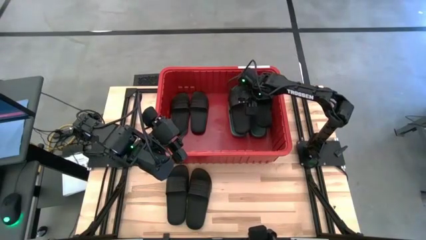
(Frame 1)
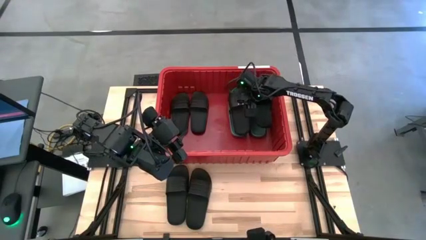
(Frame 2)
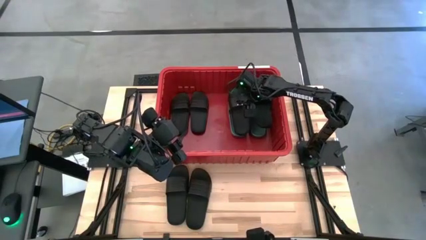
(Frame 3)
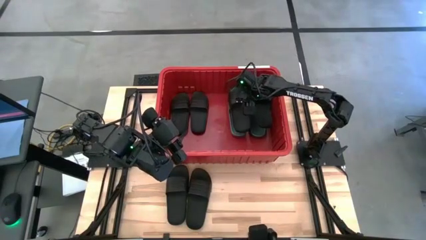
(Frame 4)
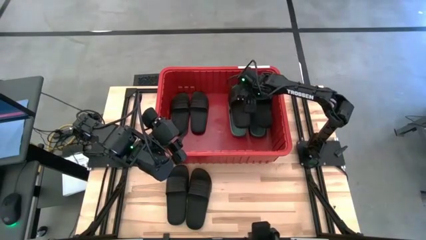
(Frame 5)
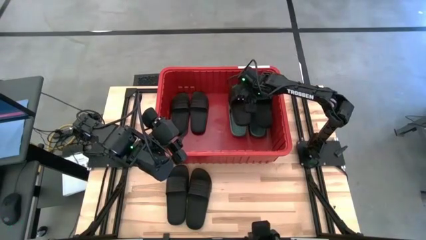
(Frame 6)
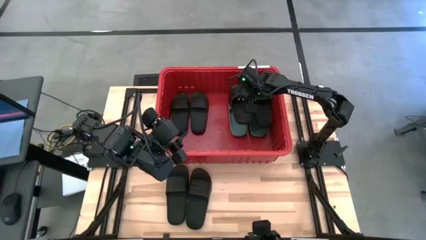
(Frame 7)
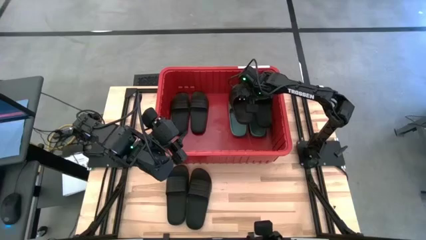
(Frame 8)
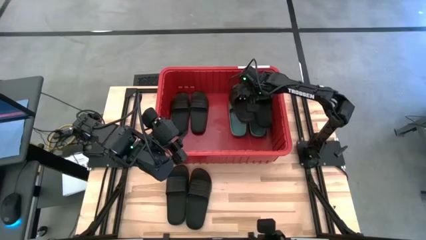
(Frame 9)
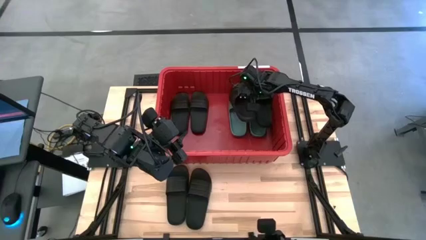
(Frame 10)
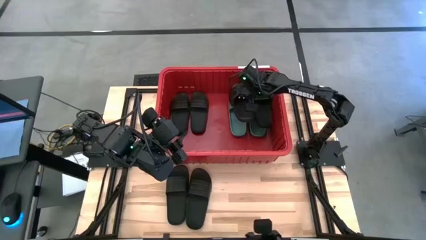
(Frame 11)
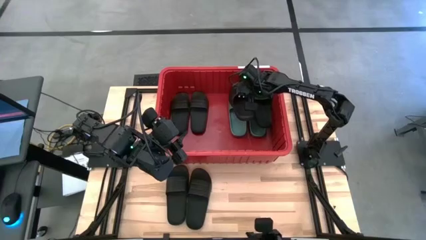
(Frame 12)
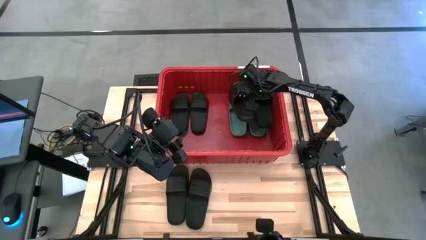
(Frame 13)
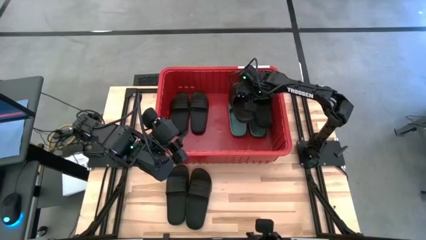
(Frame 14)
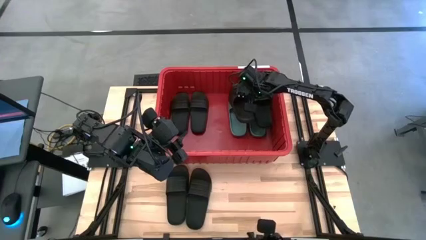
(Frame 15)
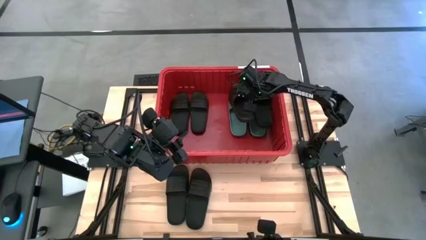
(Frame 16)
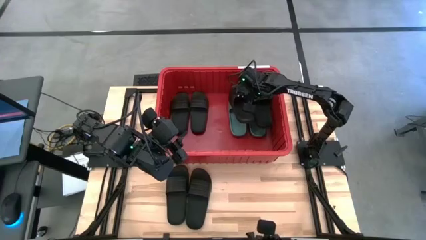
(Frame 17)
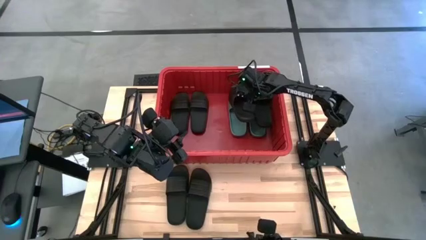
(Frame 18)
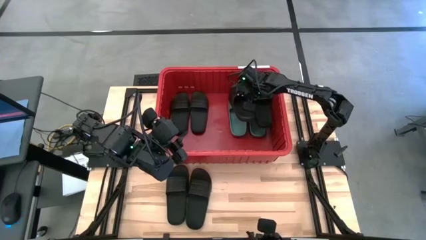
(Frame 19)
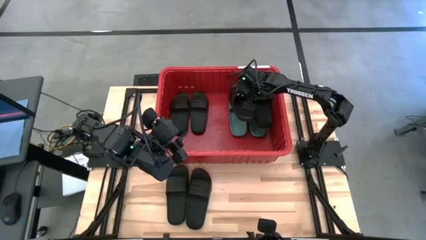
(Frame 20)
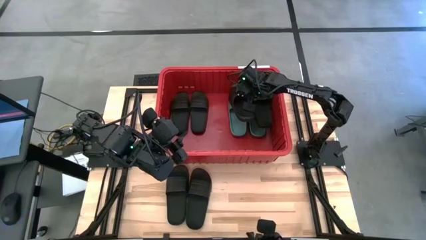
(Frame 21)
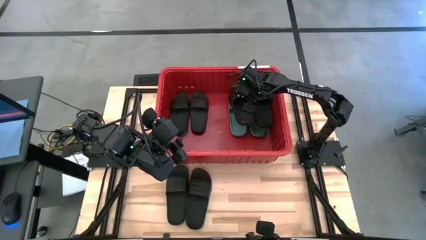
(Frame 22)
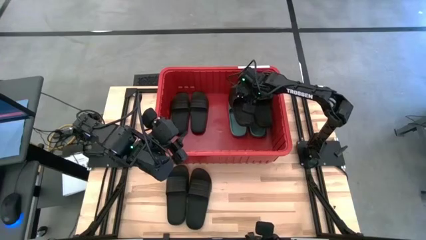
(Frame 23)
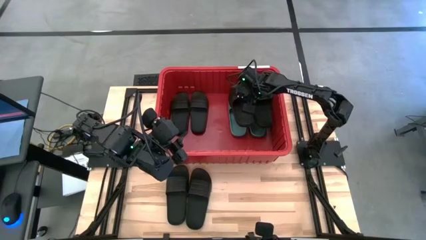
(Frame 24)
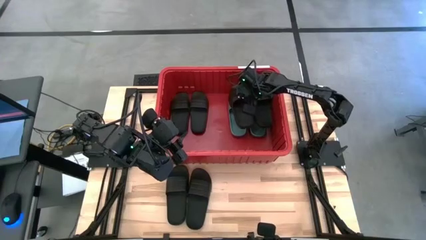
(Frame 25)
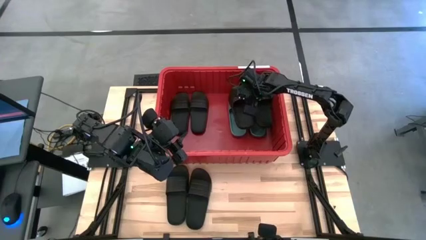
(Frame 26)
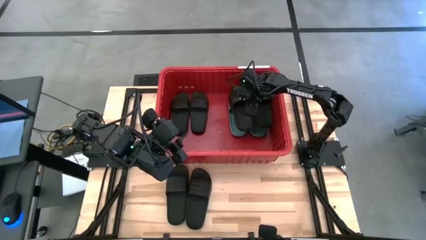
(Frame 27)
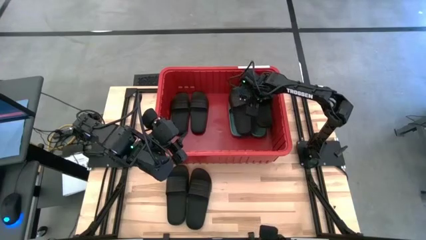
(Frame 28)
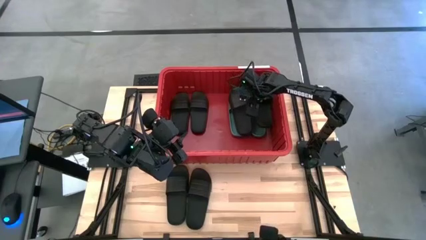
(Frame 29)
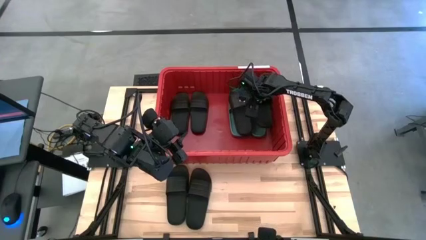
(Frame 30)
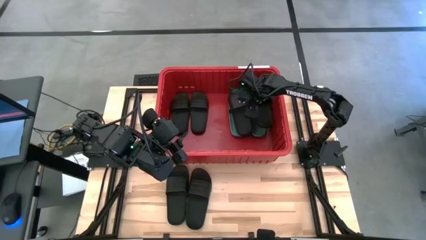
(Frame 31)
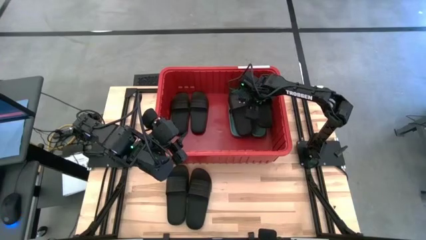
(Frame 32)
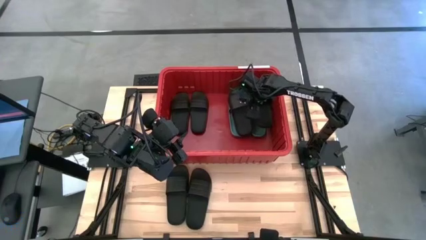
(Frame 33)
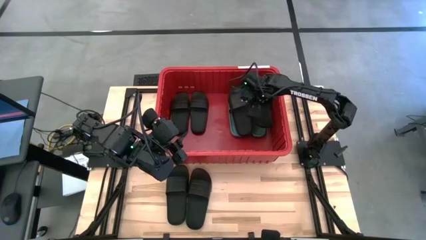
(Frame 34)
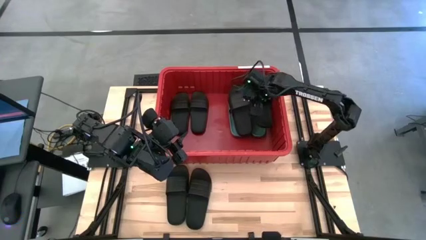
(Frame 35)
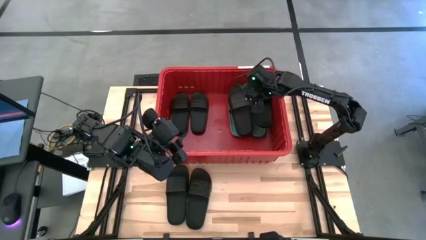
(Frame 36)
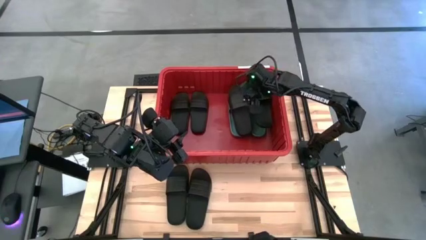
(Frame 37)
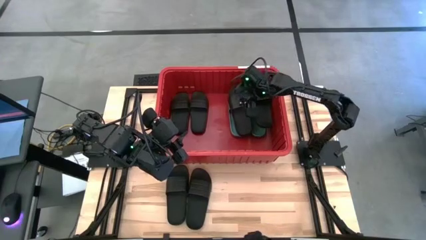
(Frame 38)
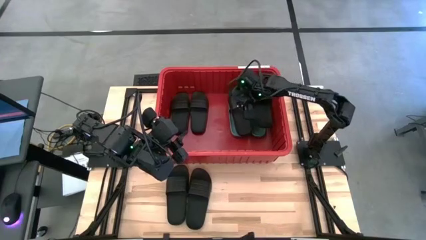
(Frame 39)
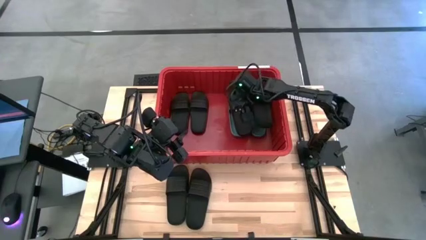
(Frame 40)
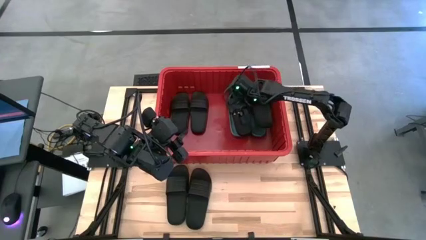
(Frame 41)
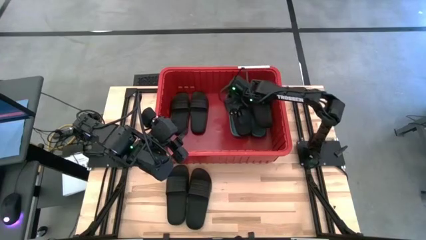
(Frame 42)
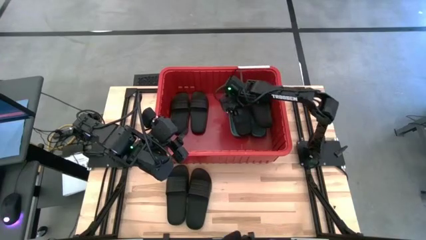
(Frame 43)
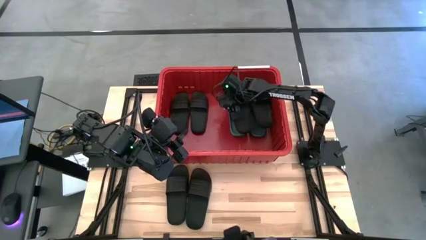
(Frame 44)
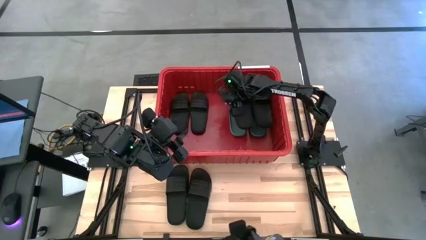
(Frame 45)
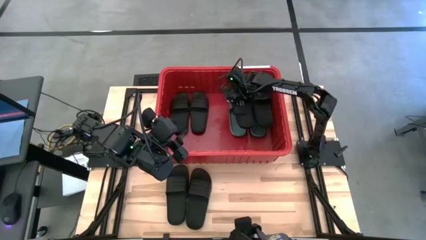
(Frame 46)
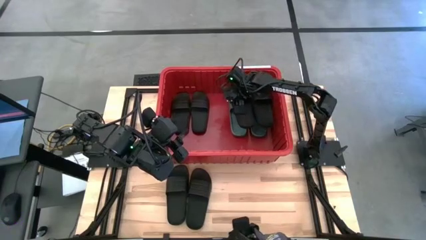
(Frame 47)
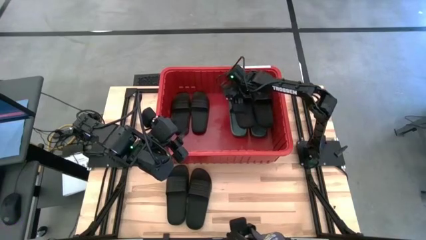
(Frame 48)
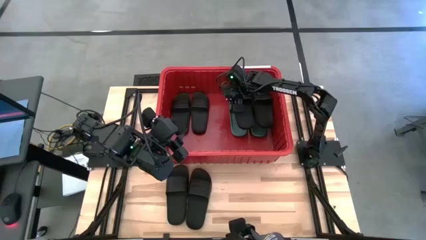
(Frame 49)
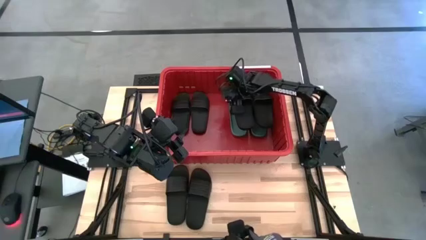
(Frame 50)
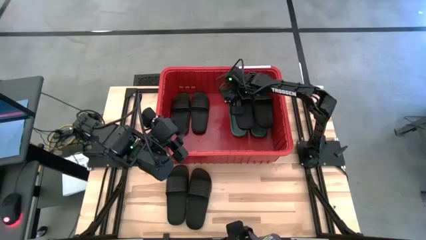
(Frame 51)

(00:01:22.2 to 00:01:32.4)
Task: Pick and place slides into bin
Put the right black slipper into the red organizer bin

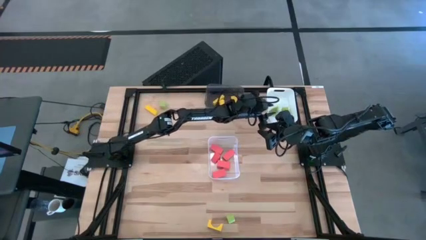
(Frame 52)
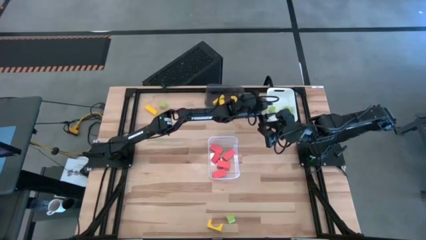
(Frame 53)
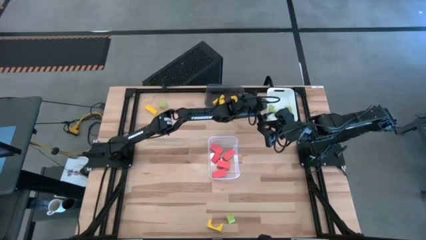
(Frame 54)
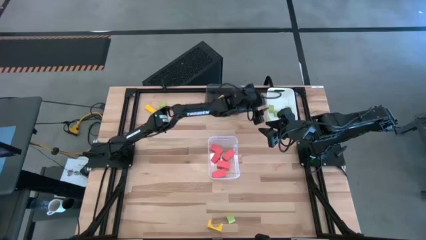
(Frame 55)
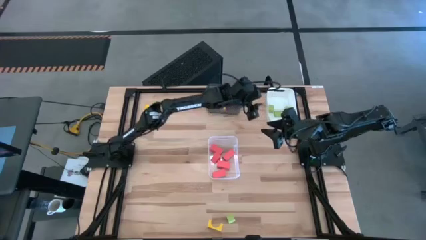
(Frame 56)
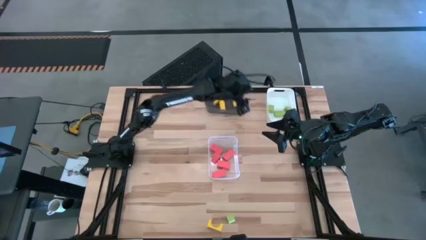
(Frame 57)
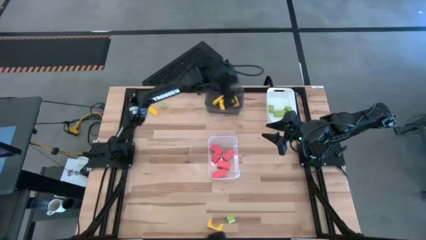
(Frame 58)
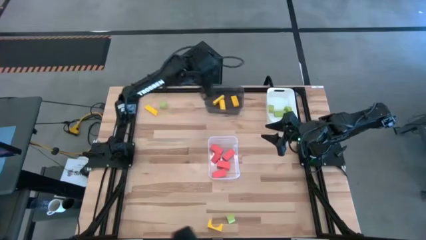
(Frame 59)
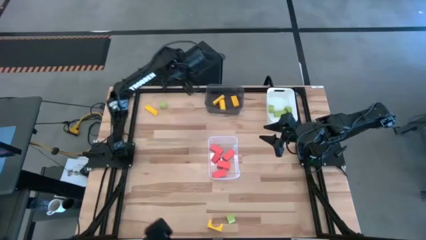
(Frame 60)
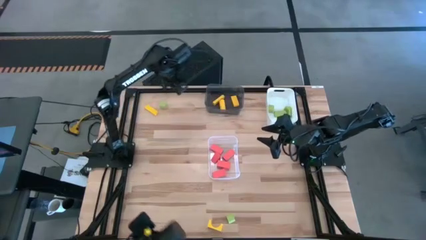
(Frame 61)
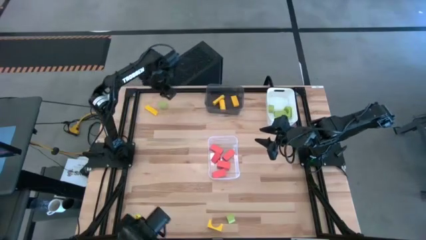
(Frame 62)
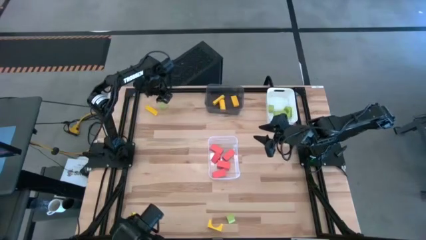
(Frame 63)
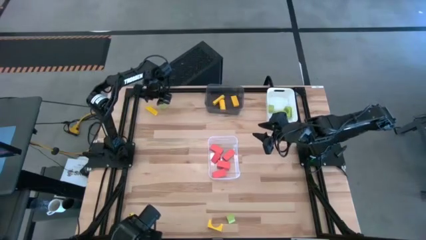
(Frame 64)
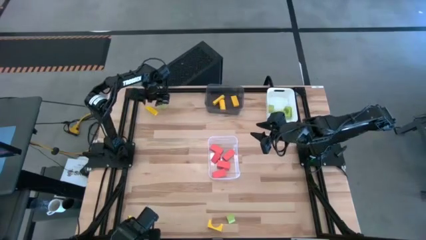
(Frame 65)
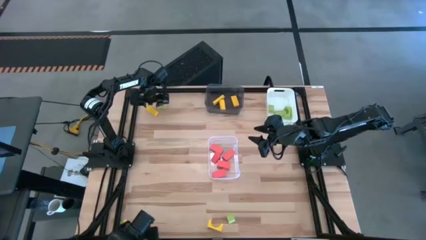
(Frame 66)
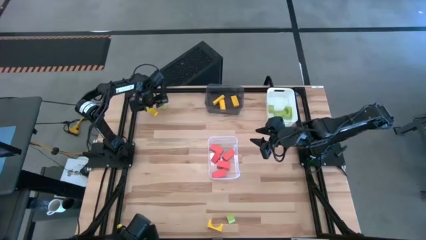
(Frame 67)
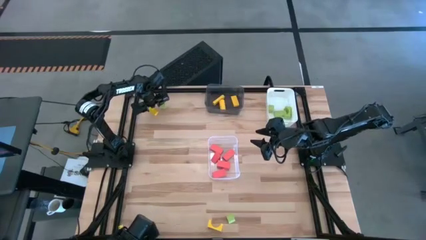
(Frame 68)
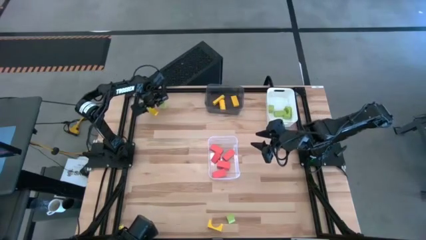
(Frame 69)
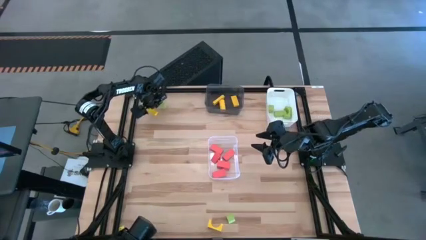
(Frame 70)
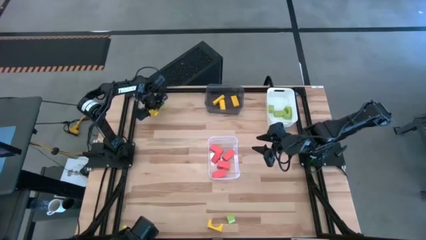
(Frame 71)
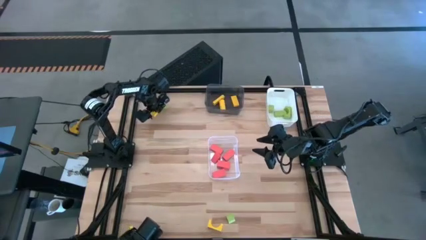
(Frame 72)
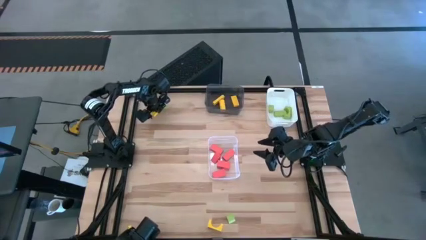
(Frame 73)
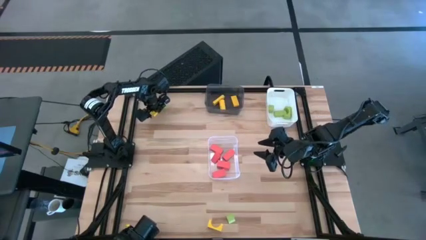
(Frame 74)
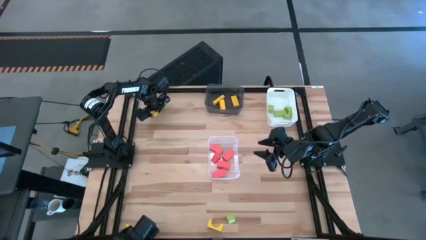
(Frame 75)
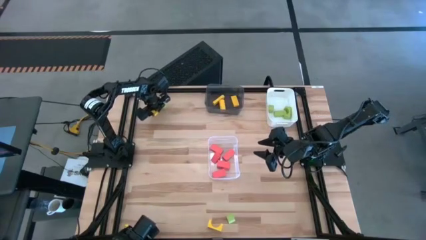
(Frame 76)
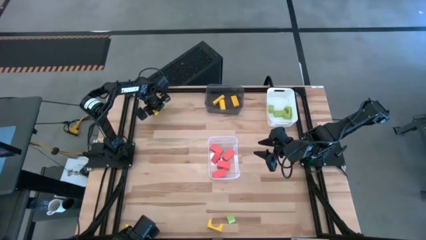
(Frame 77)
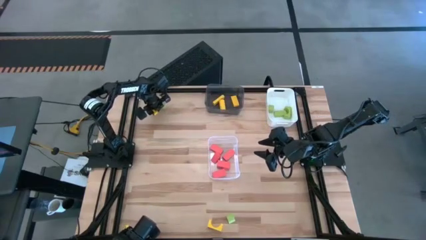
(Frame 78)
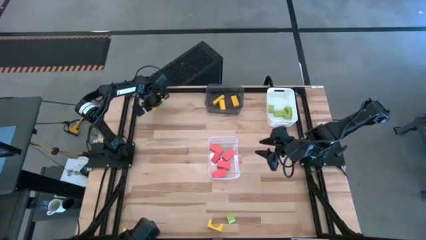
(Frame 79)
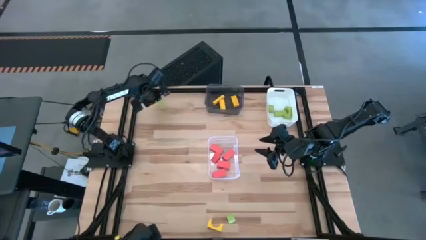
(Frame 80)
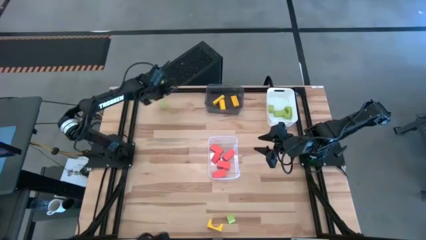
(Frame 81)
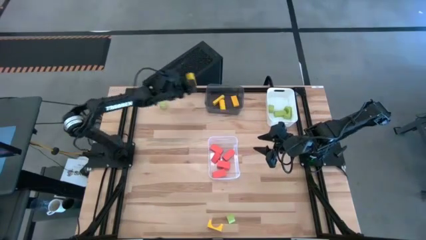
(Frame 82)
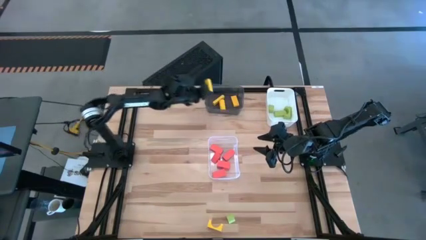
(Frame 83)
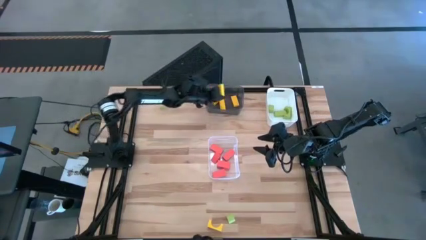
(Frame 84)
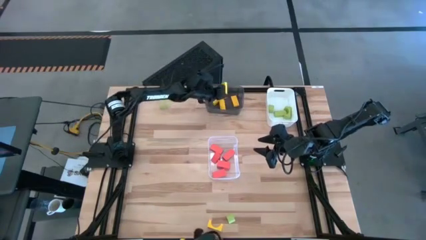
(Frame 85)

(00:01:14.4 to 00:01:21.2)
Task: Sort & place blocks by color
Put the yellow block into the black bin
